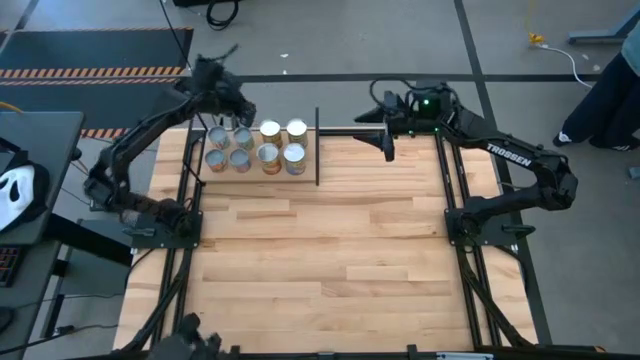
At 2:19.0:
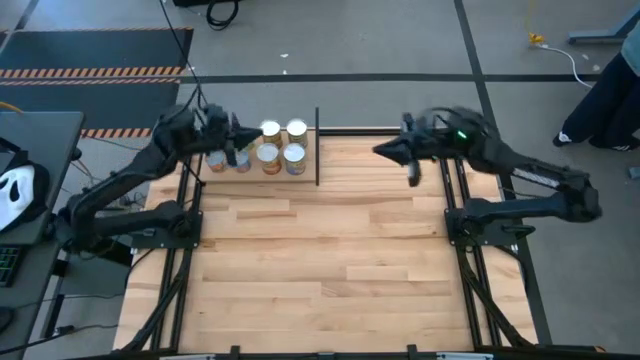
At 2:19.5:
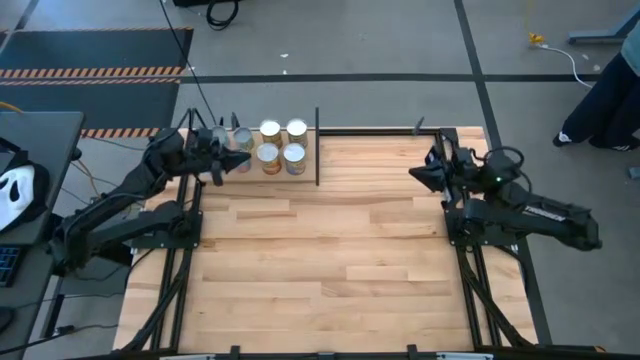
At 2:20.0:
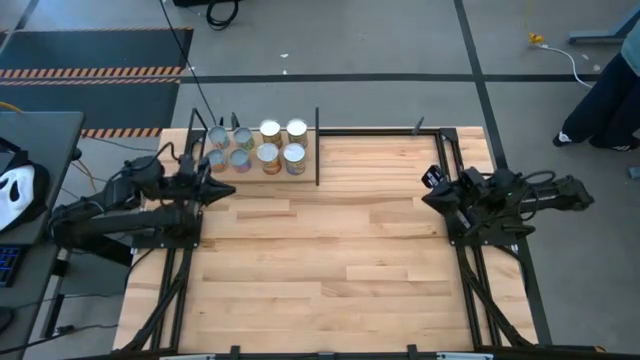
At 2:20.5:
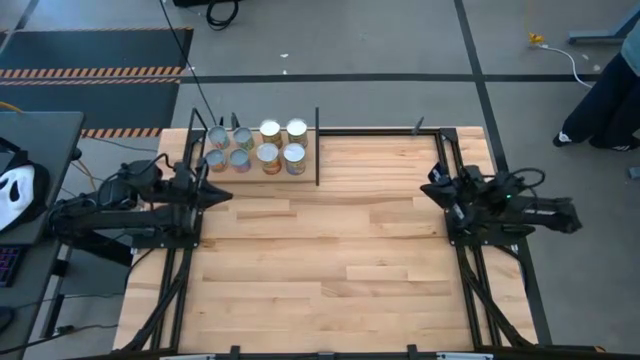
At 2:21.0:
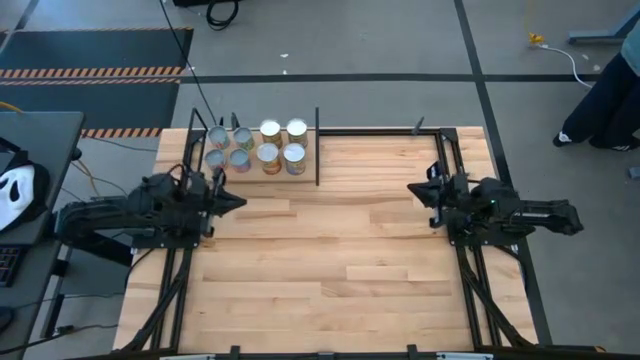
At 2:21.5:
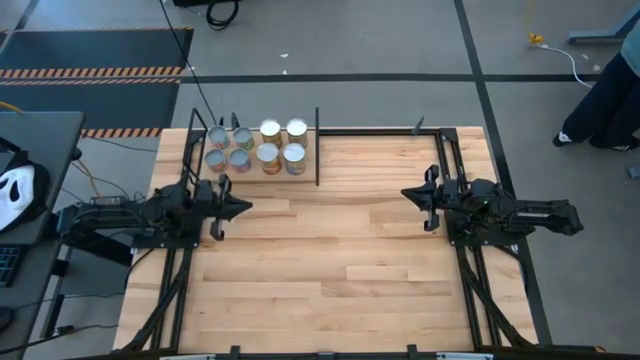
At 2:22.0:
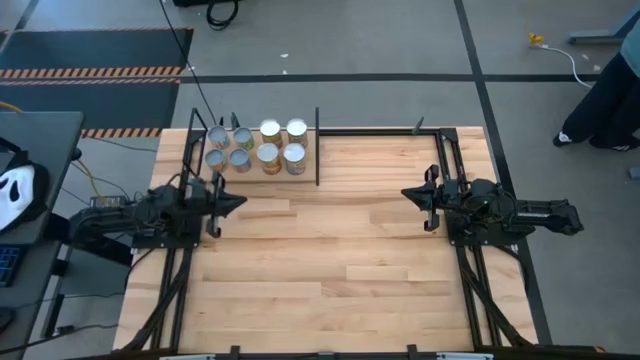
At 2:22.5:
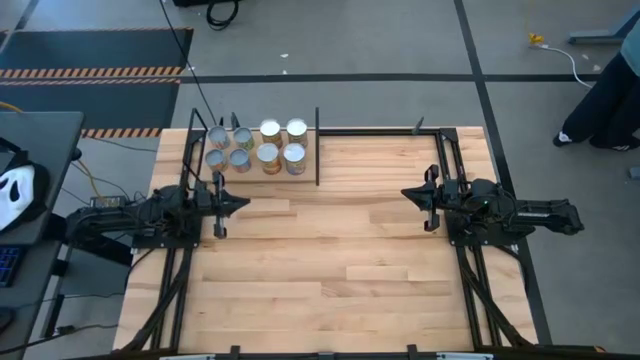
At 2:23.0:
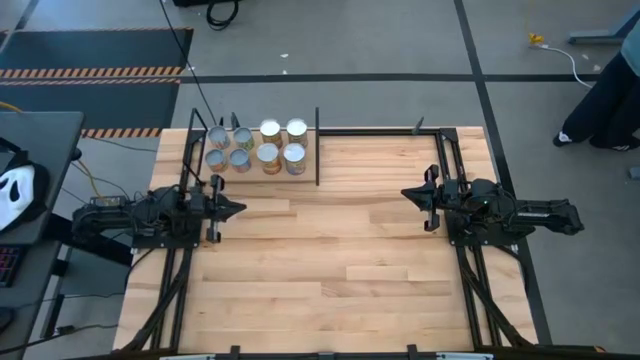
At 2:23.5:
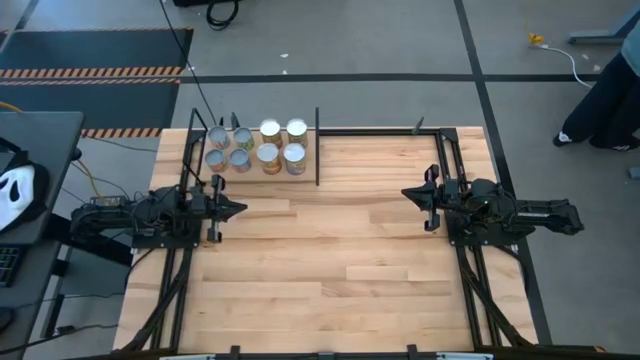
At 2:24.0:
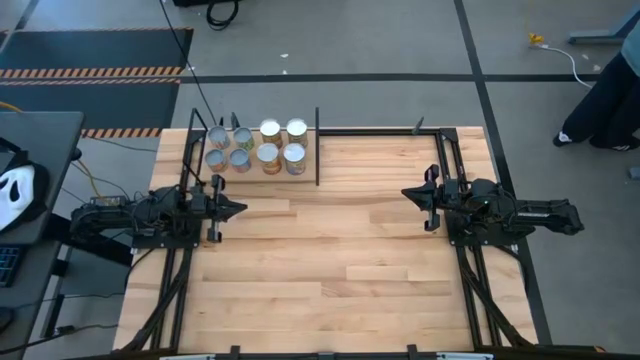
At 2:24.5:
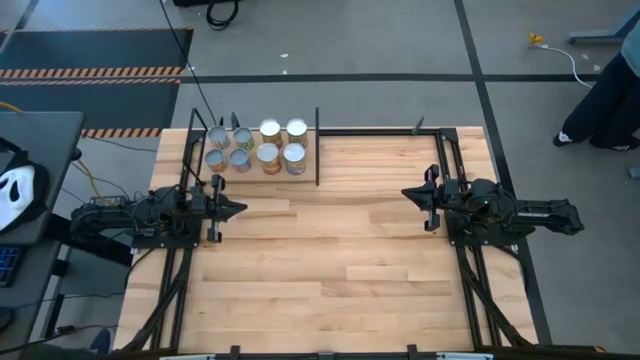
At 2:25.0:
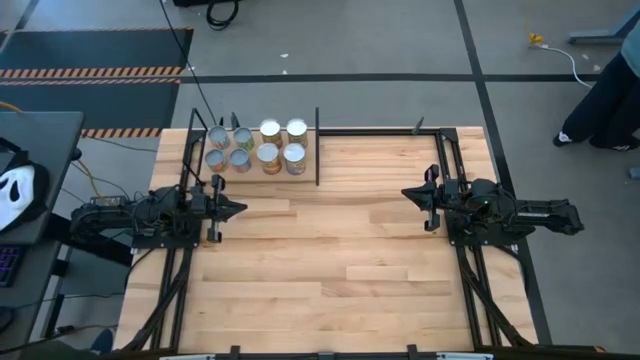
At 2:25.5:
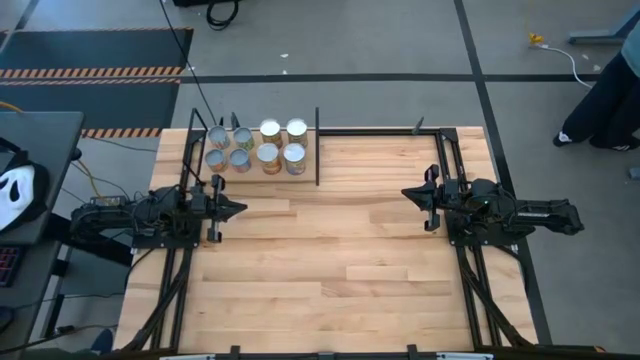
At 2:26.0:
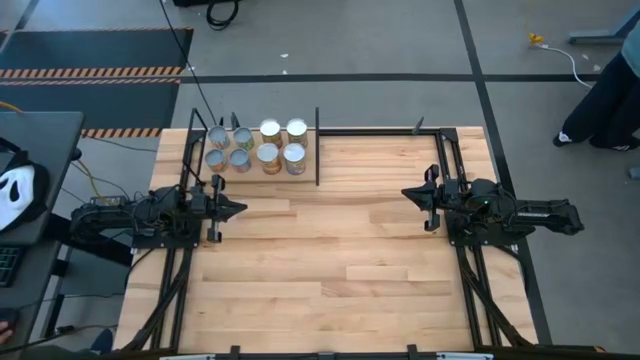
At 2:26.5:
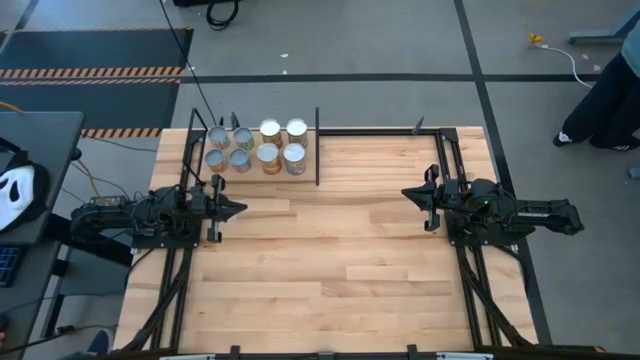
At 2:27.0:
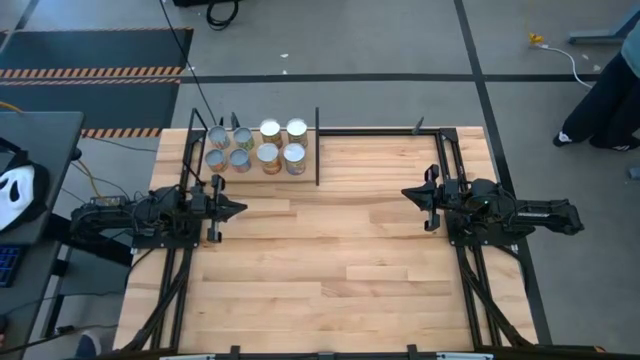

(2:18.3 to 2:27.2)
Task: Pick and place cans onto a shelf
Return to Home Position

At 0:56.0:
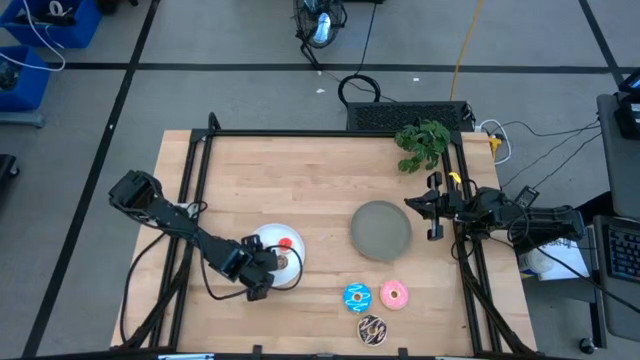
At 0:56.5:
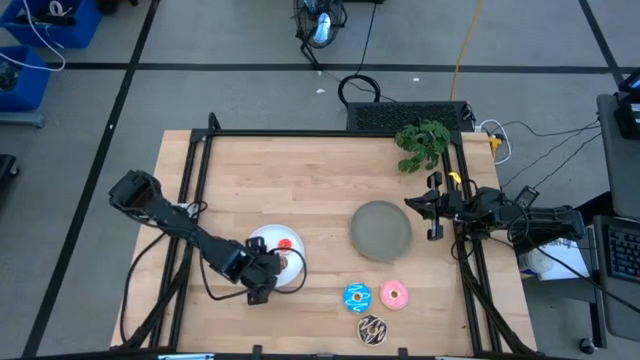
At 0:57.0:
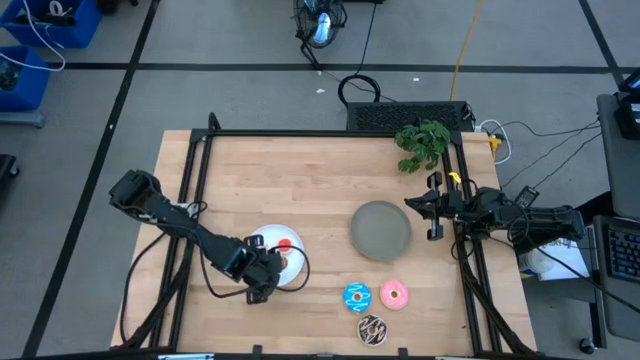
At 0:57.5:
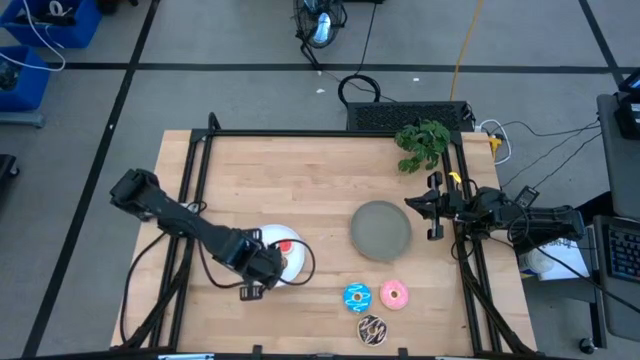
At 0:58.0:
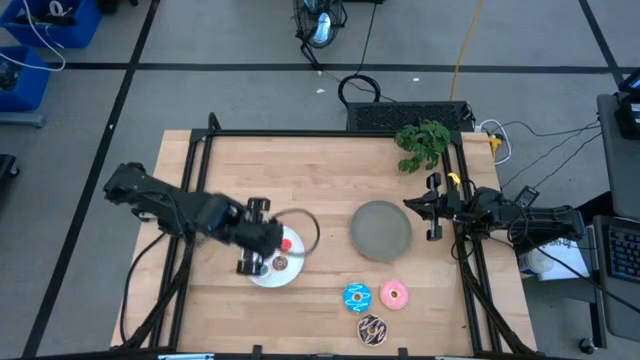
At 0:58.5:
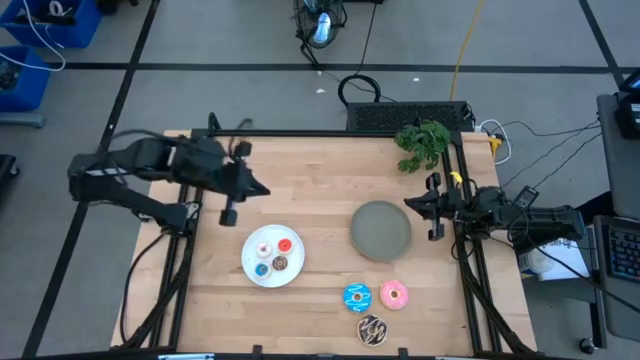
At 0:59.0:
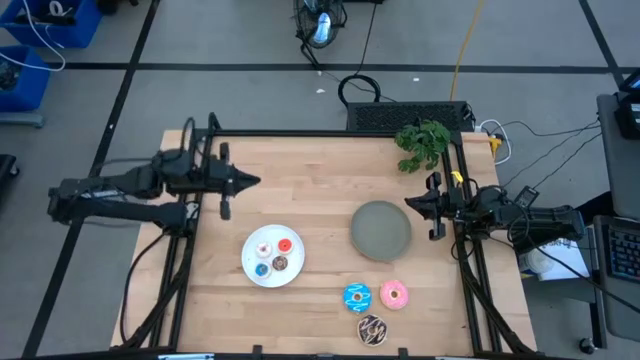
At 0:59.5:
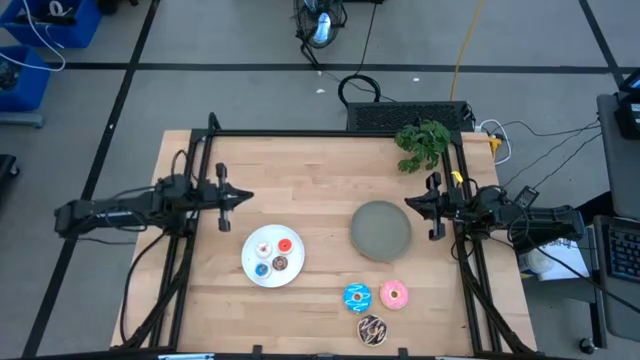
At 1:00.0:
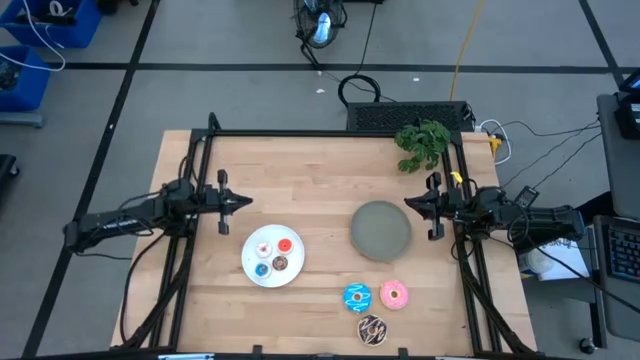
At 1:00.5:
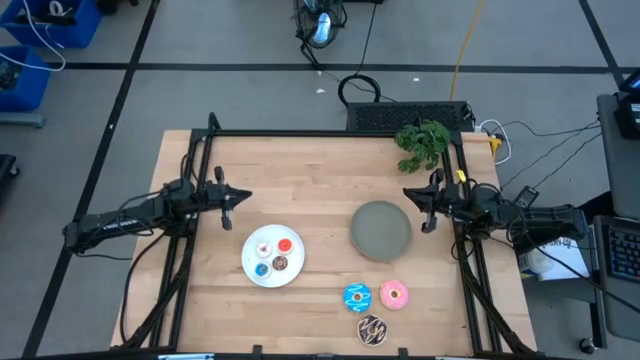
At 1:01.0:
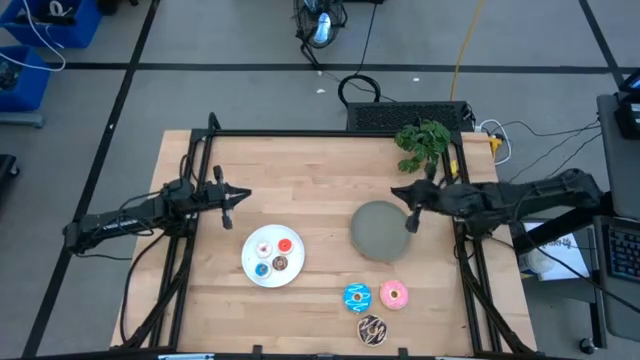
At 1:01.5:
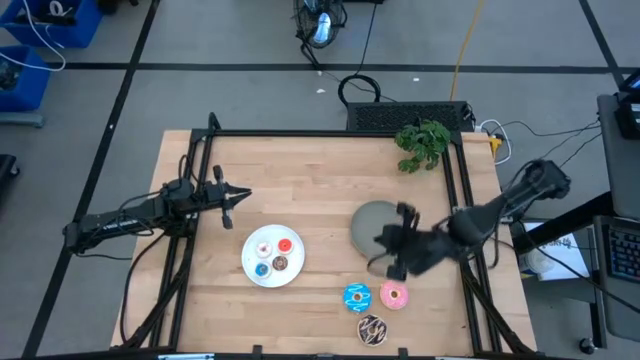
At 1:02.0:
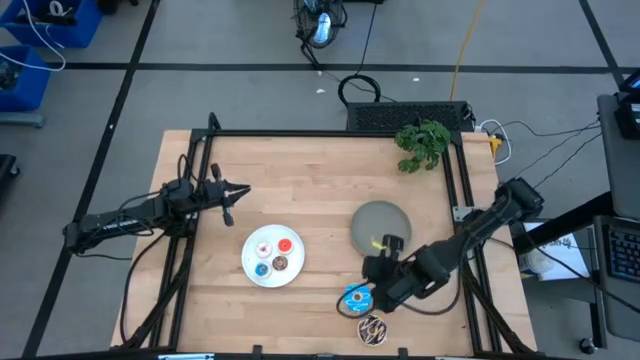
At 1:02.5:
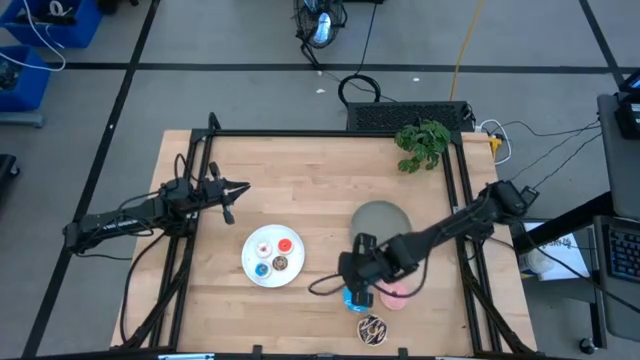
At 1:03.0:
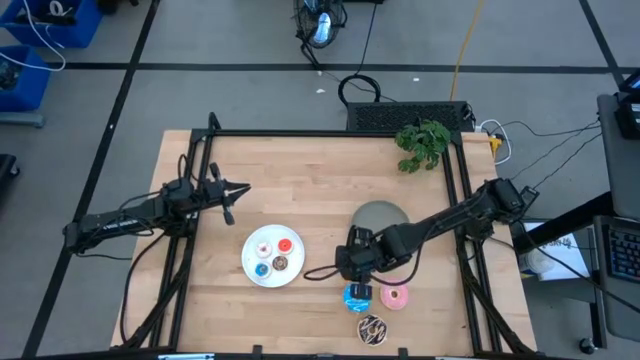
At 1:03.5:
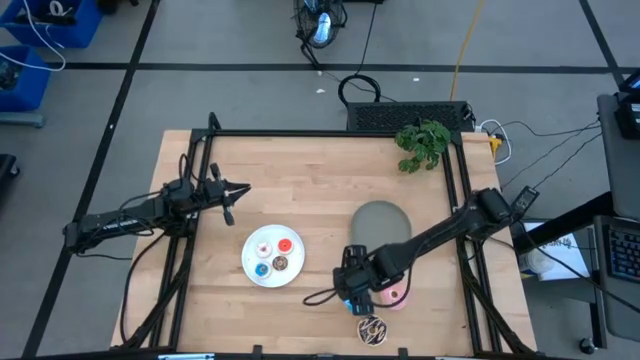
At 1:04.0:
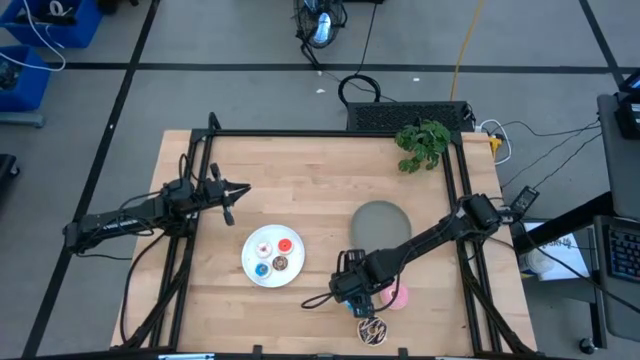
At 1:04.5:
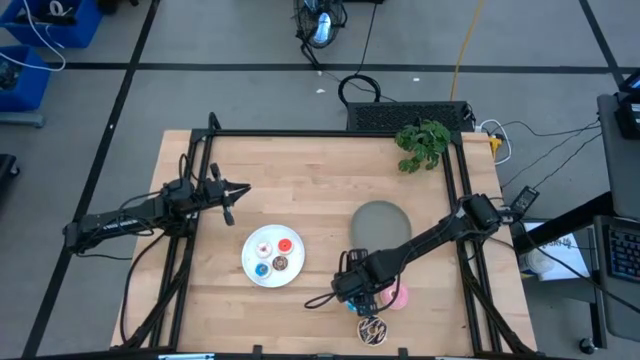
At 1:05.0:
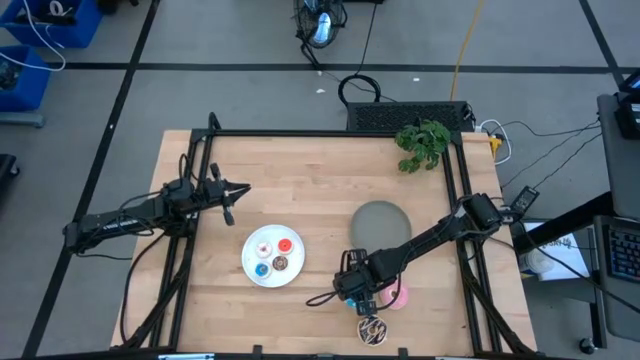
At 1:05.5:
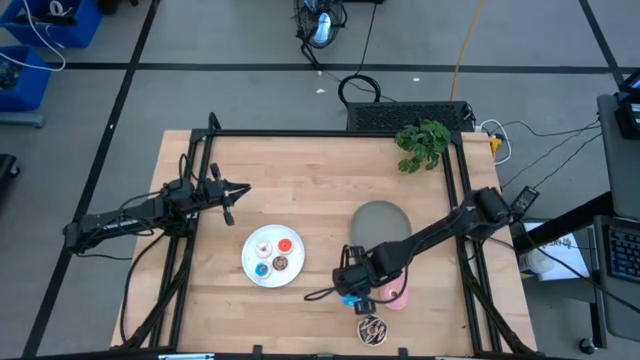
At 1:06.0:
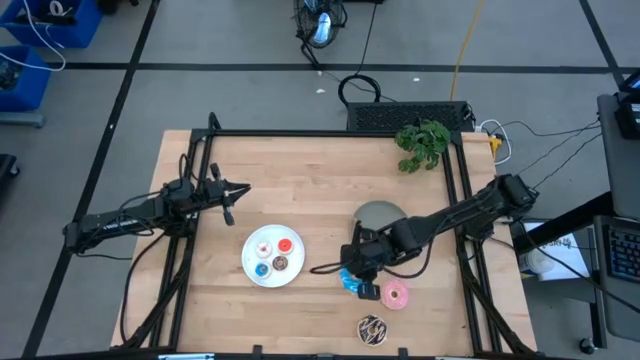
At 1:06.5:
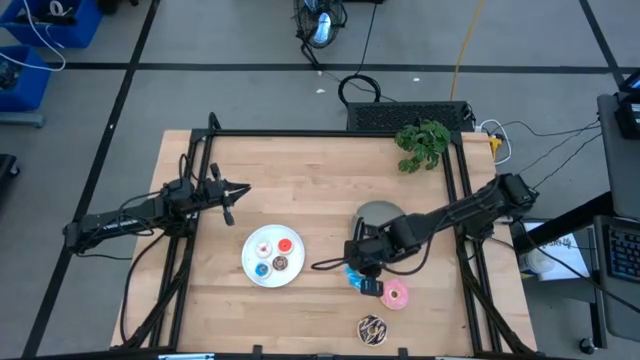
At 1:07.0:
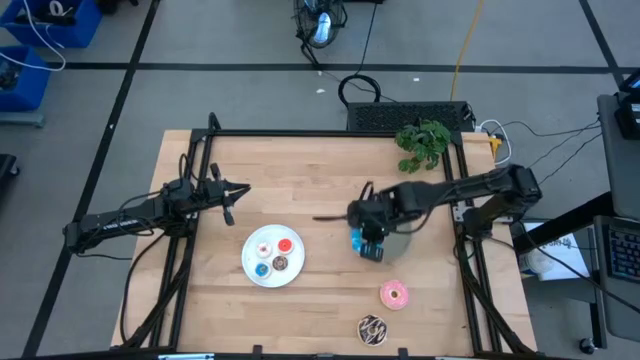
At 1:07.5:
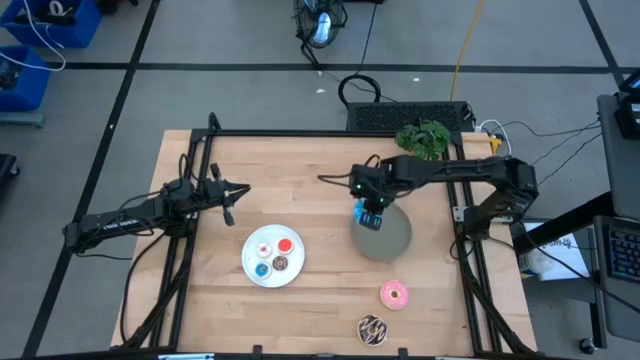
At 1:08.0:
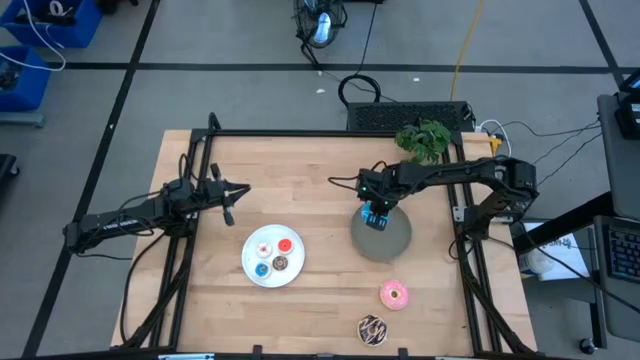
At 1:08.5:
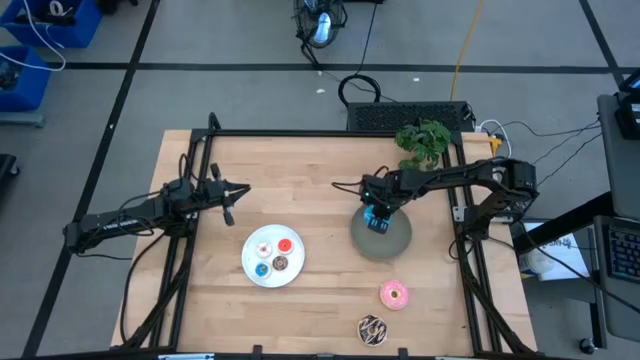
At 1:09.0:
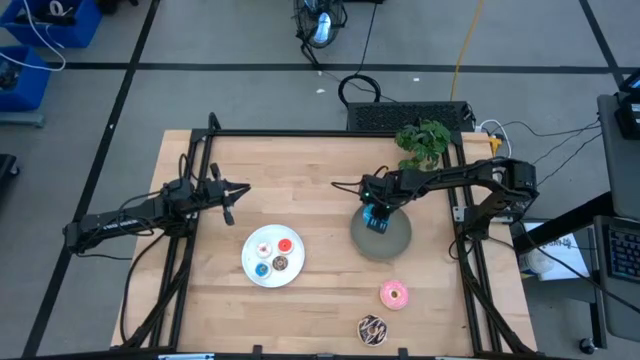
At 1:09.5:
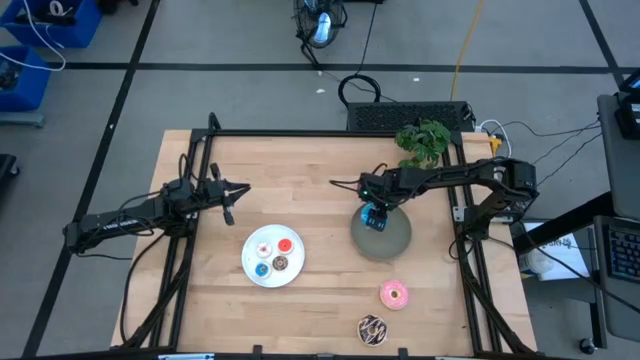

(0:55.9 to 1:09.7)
Task: Pick & Place donuts
Put the big blue donut on the gray plate
